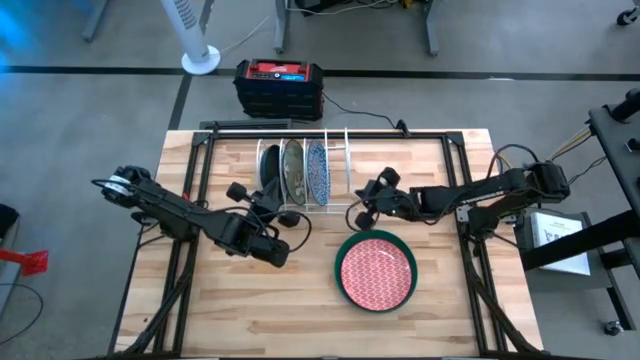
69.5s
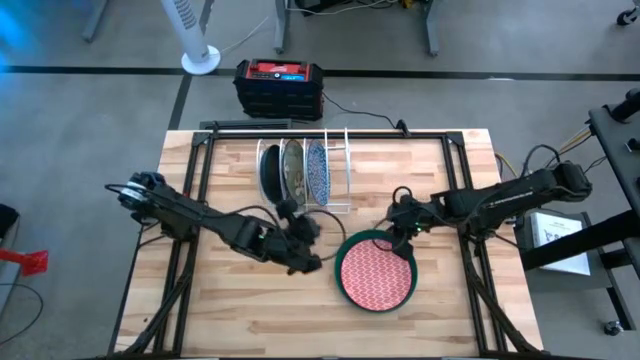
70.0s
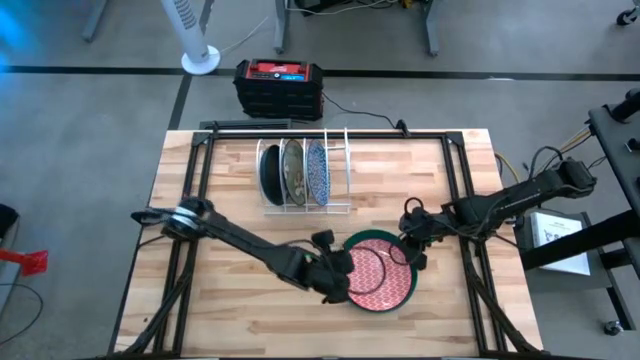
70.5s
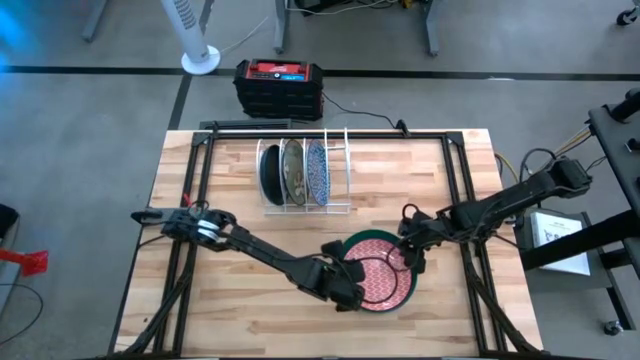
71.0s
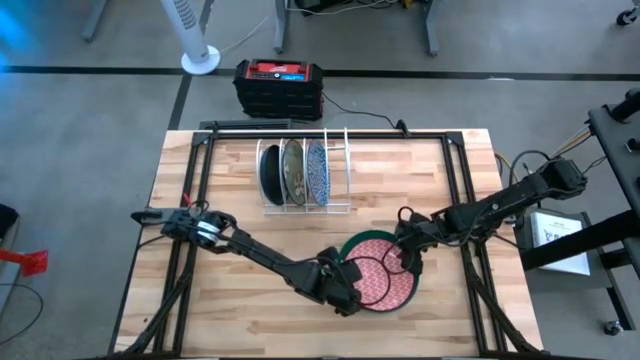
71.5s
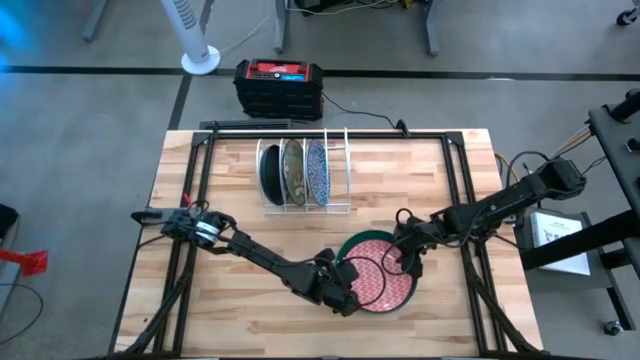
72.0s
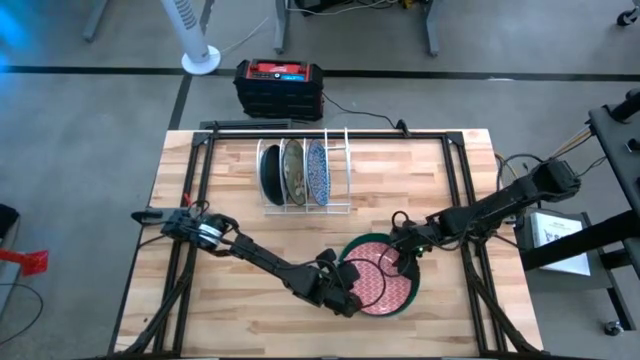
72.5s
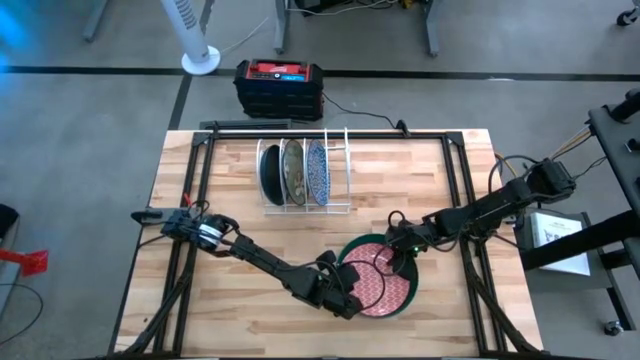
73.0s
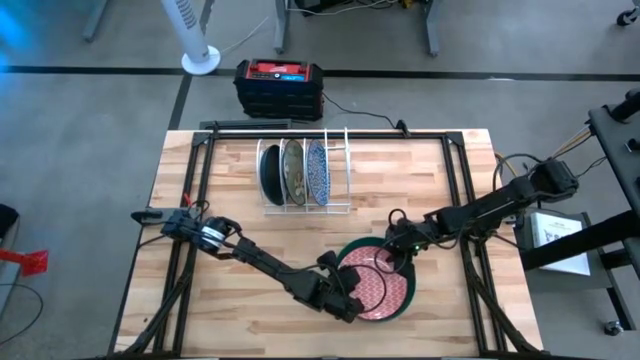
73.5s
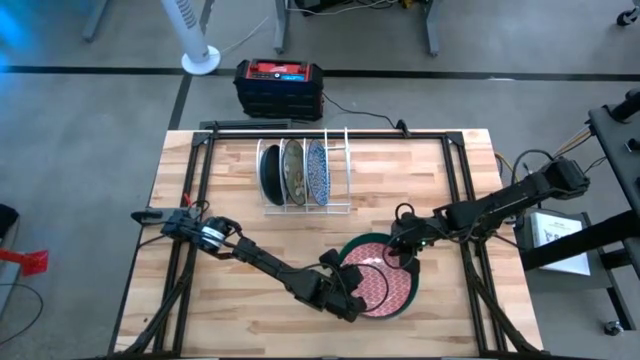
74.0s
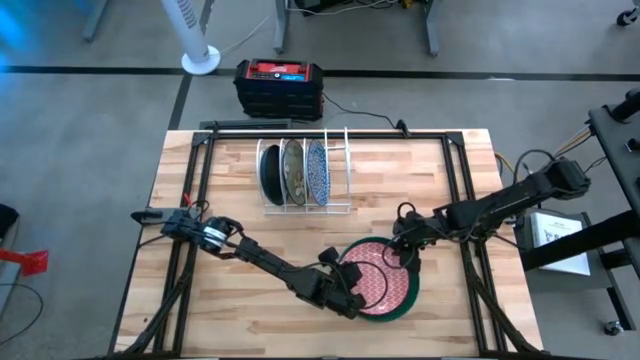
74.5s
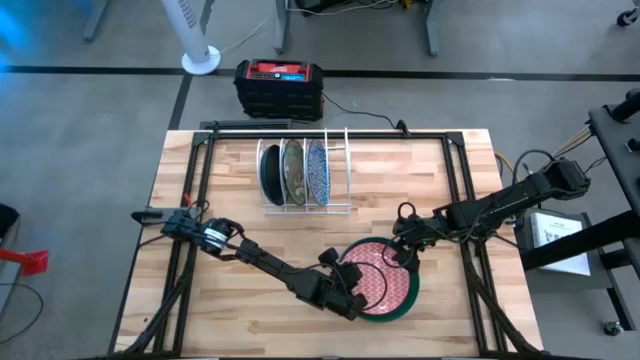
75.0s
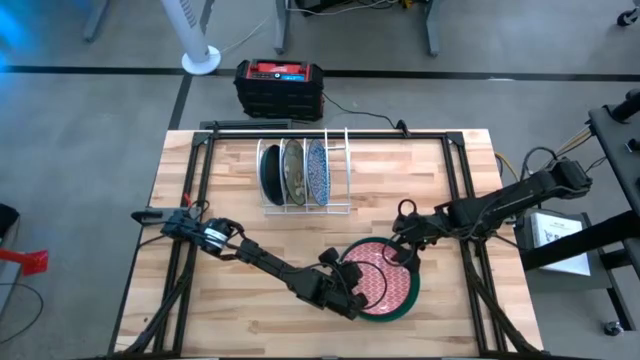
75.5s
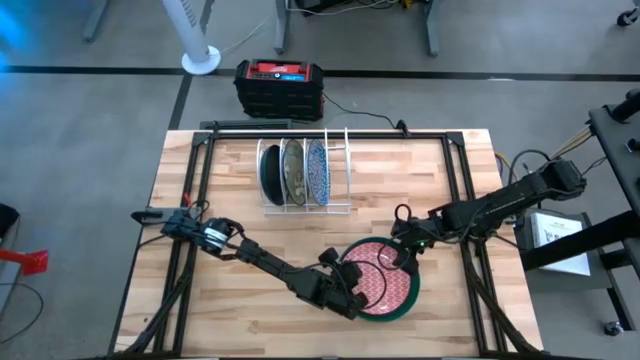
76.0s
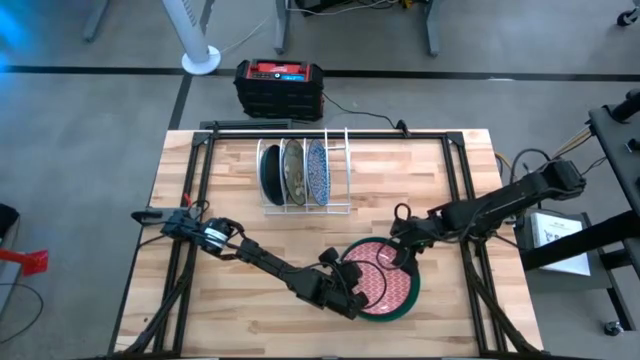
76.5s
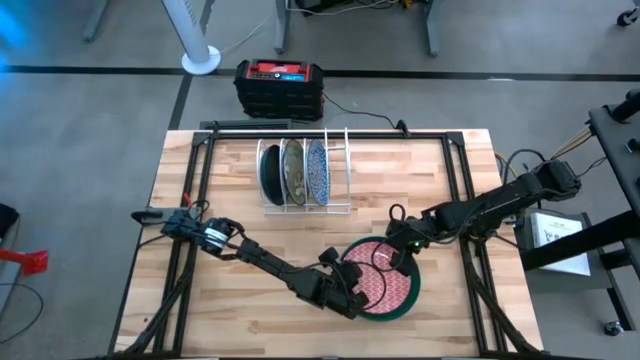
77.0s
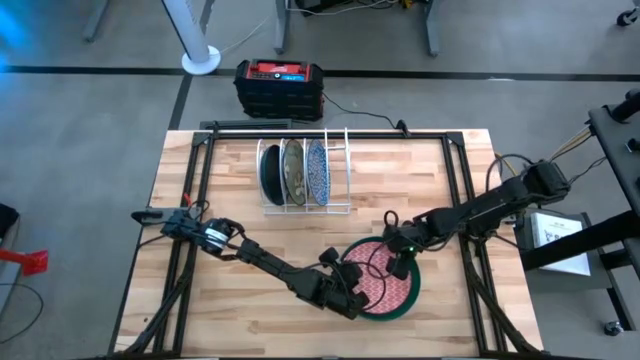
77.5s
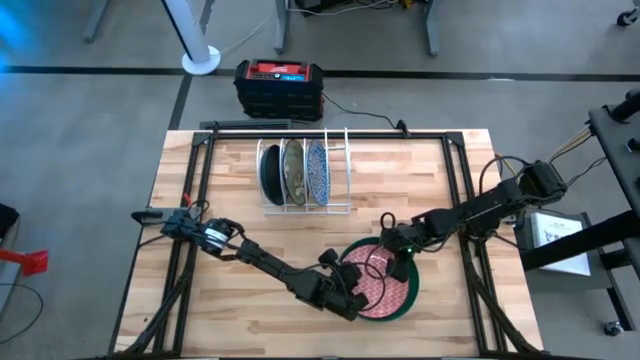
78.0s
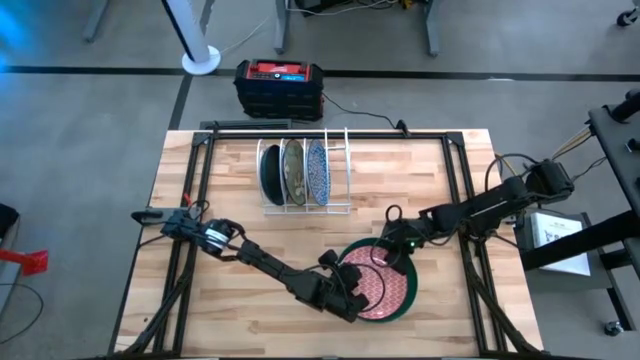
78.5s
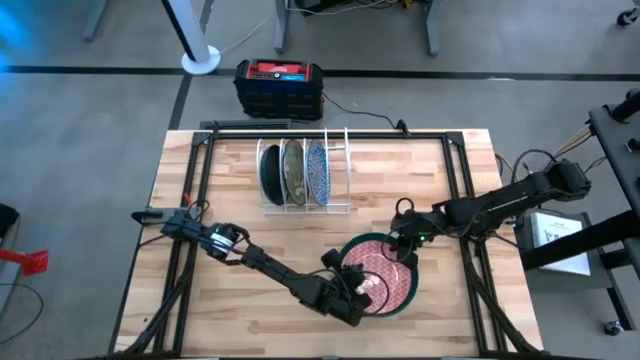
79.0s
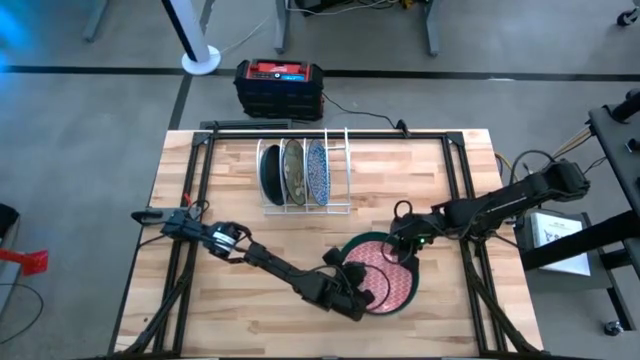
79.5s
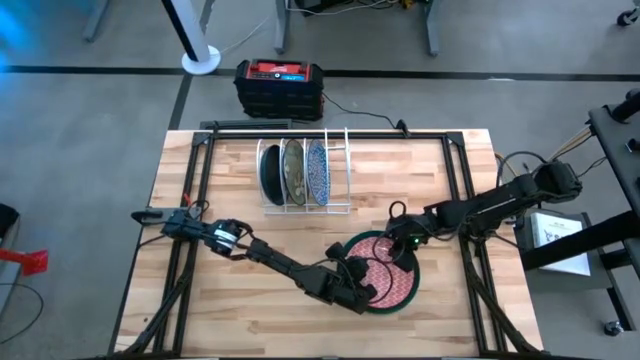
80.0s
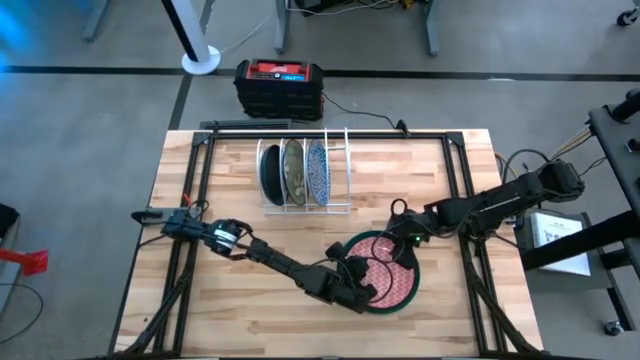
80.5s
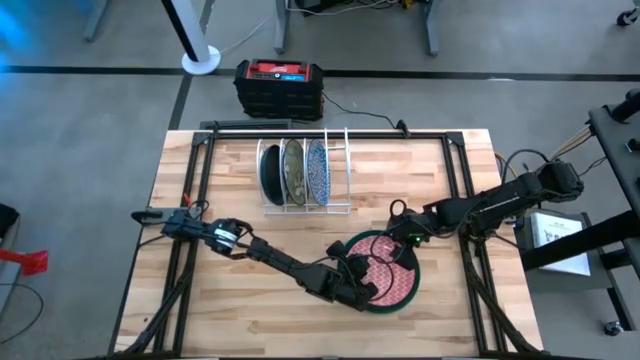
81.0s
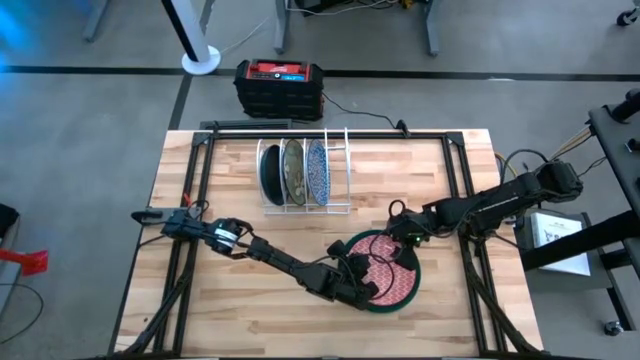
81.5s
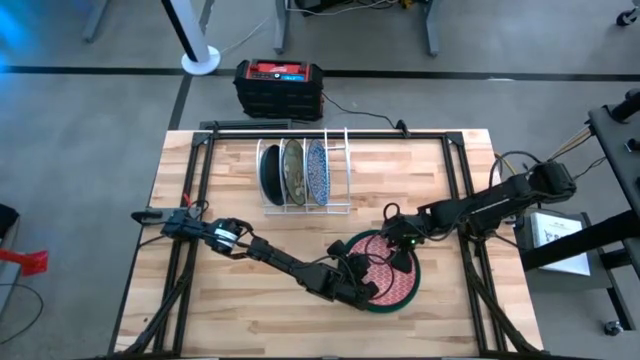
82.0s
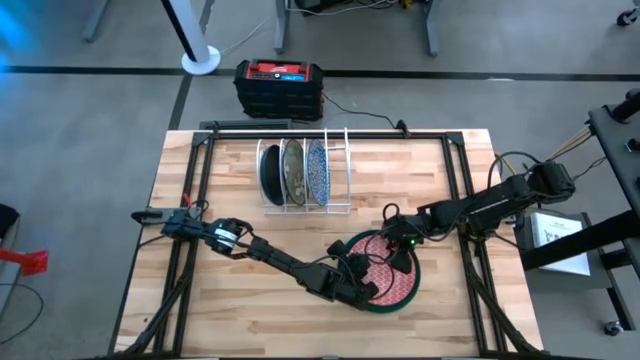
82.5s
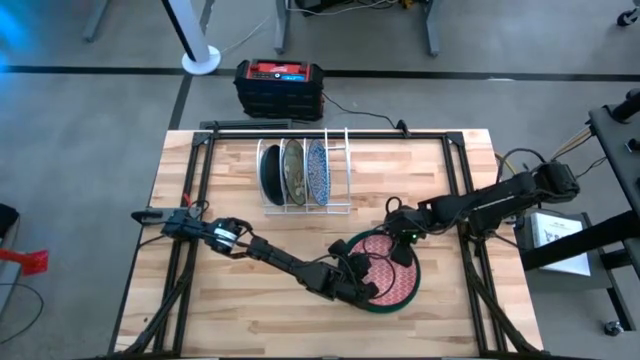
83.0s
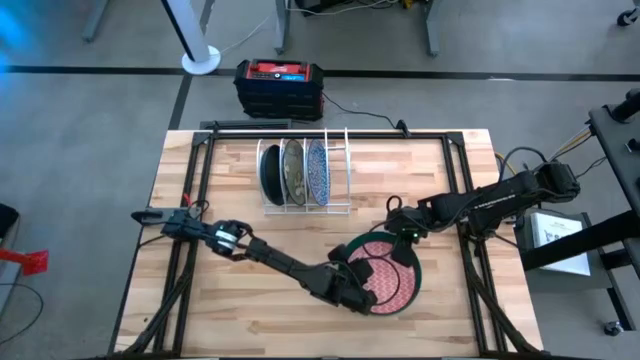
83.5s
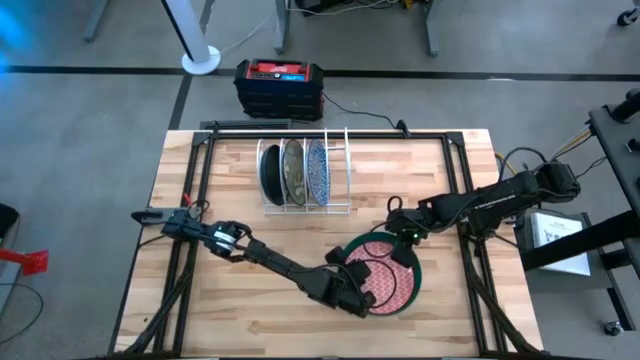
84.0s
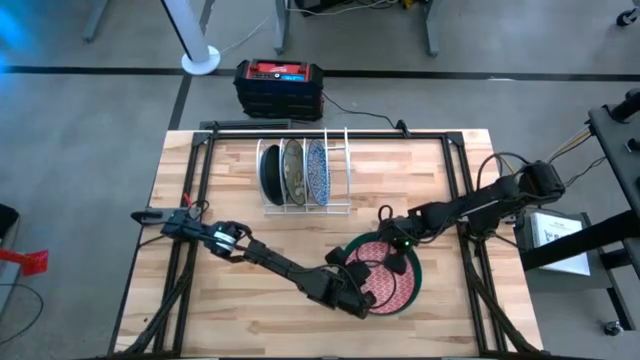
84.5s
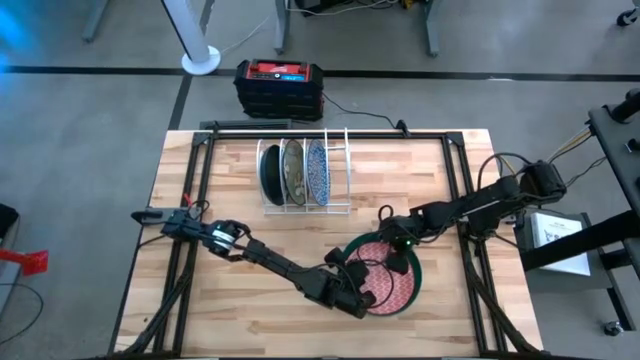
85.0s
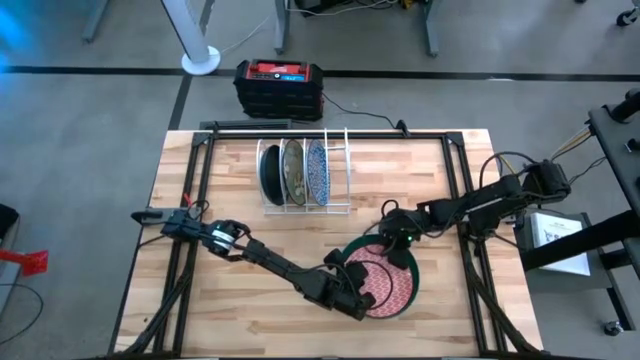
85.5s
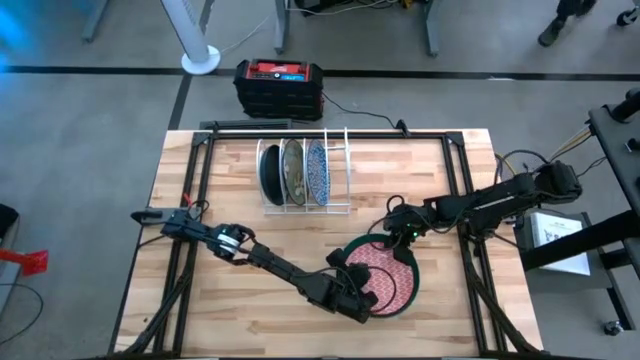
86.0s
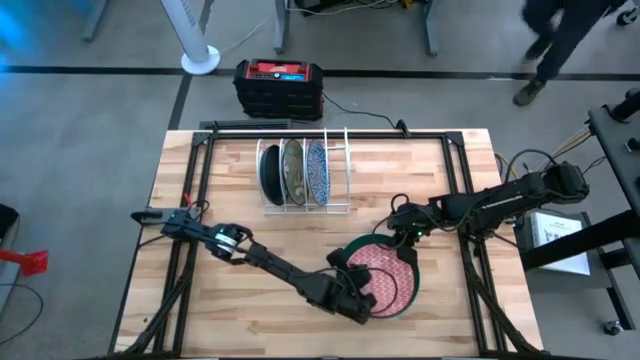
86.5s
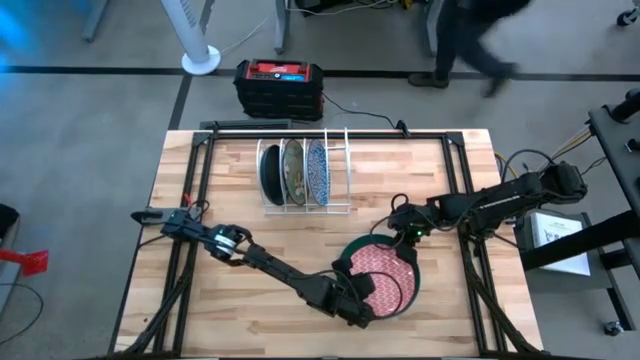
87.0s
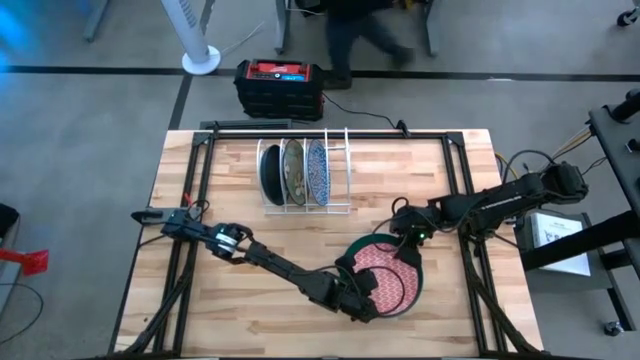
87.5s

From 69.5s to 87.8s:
Task: Sort dishes
Put the orange pattern plate into the white dish rack

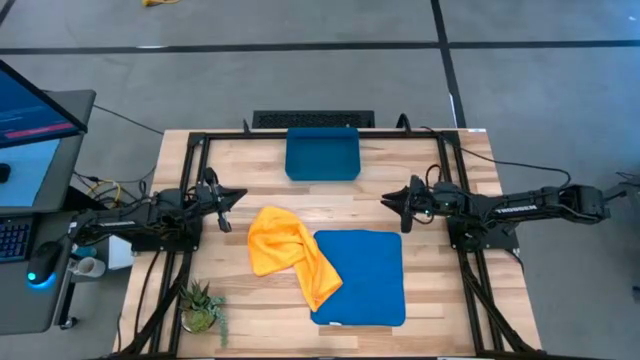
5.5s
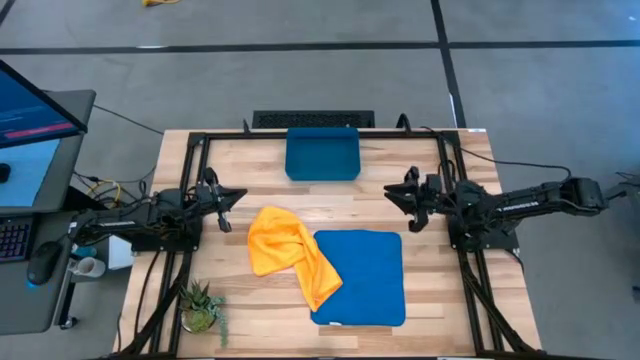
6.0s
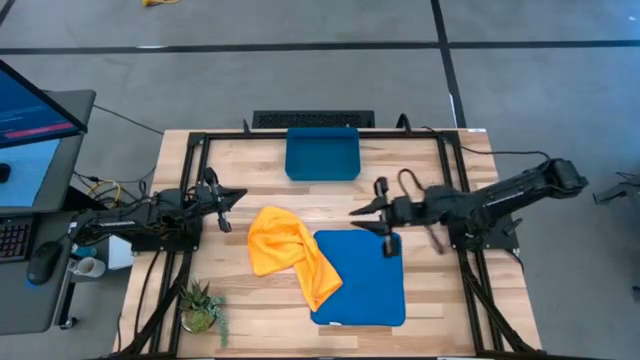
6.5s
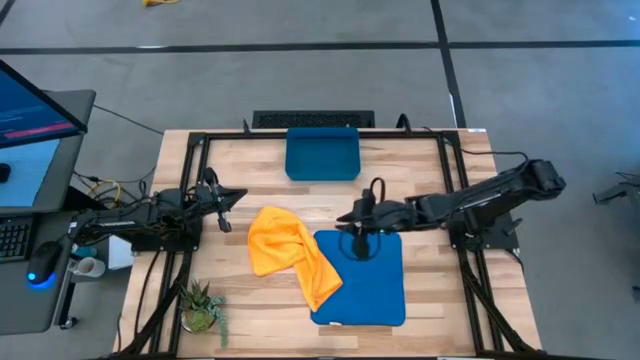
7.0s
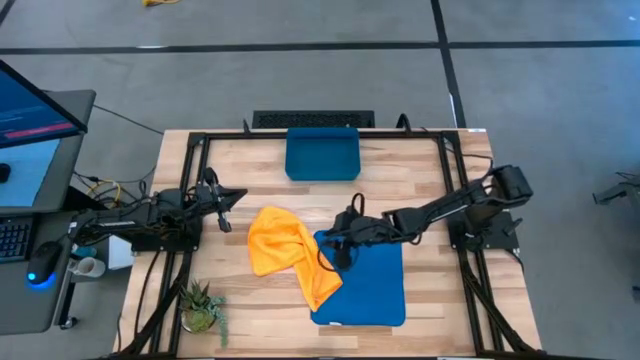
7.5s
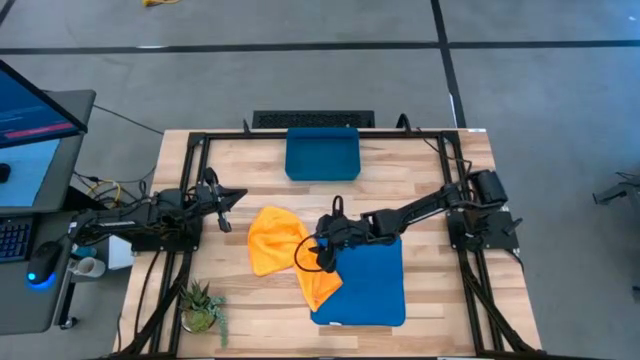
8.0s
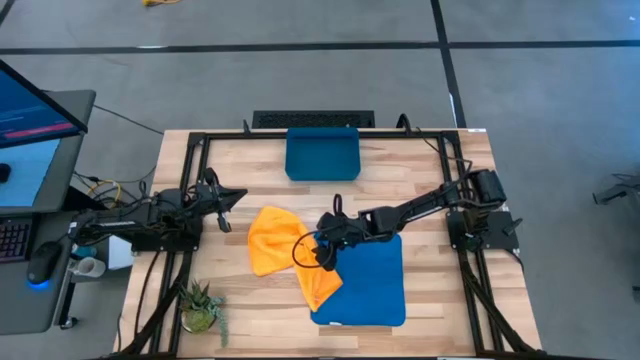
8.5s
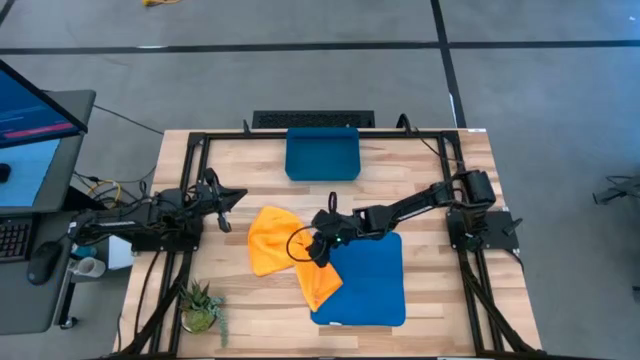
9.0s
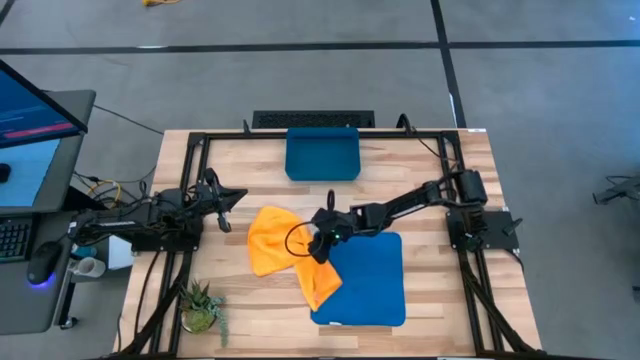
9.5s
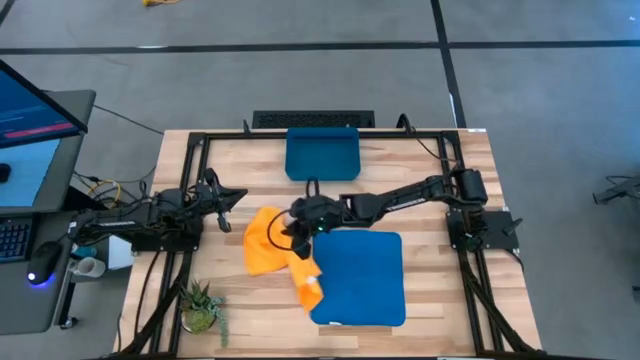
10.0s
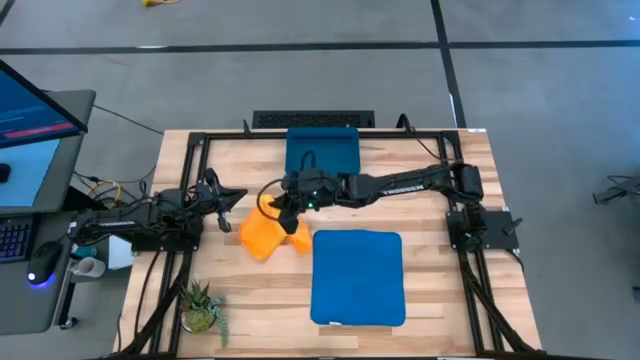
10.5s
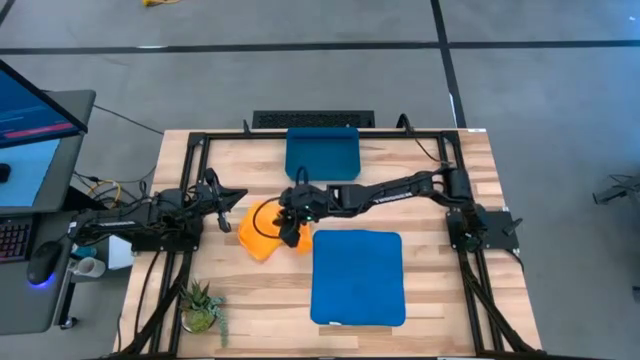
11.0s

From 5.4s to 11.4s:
Task: Roll microfiber towels into tight, uniform cylinder then place into a basket
Prepare the table to fold the microfiber towels
